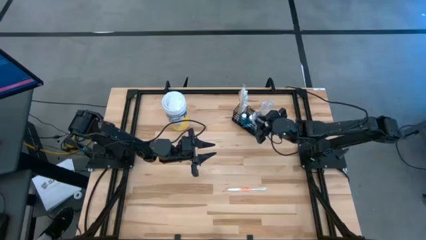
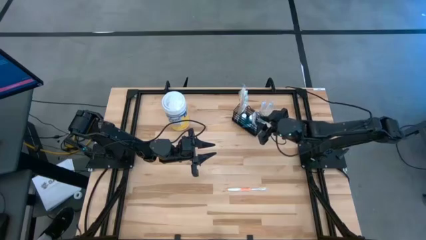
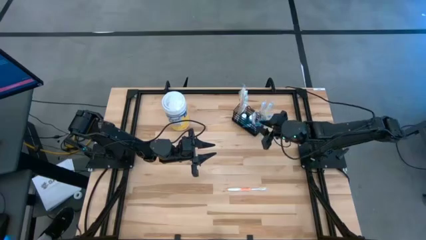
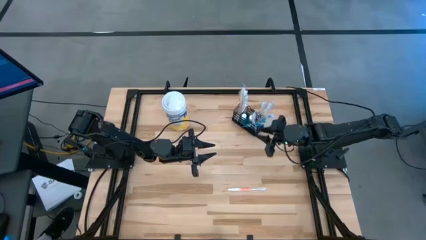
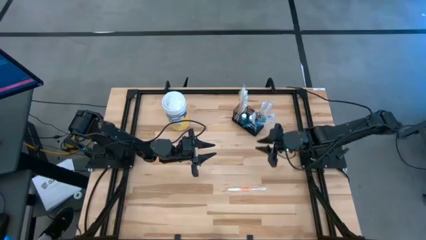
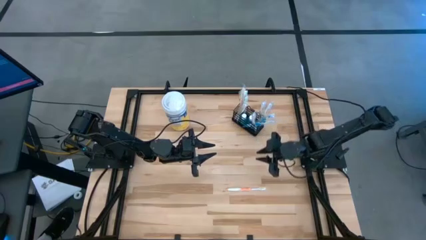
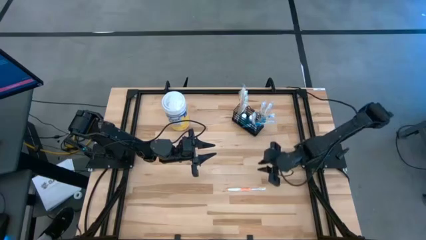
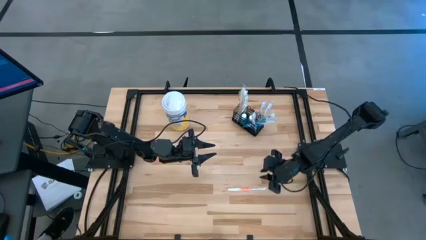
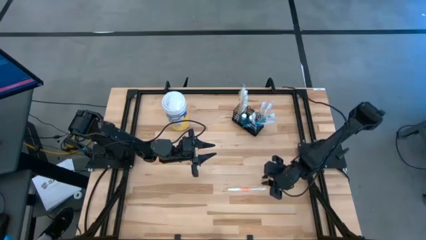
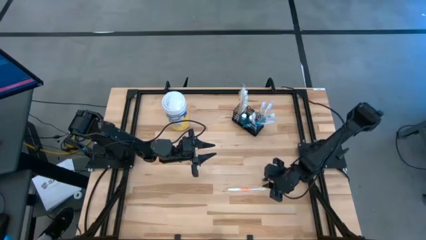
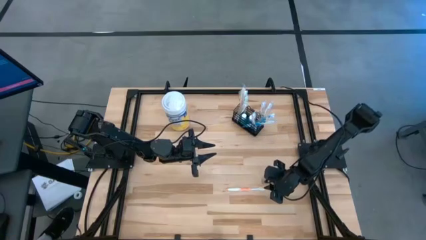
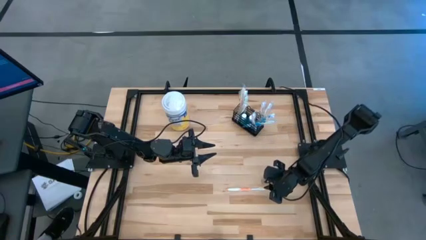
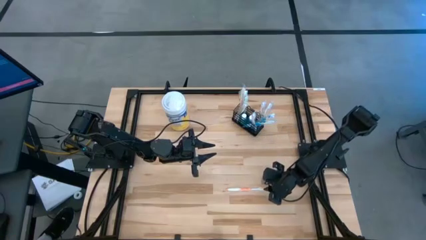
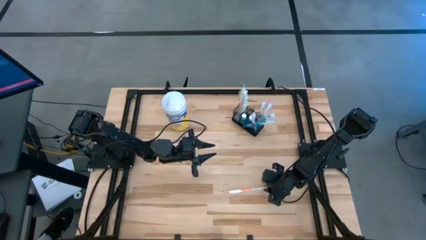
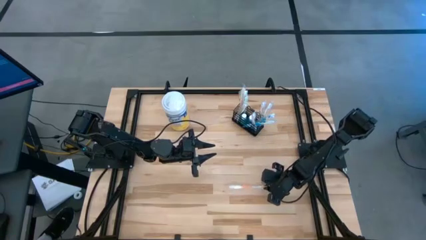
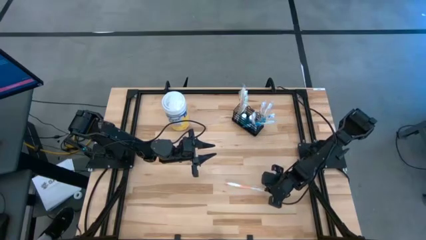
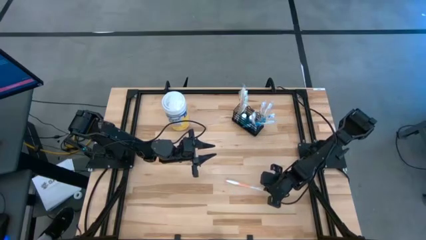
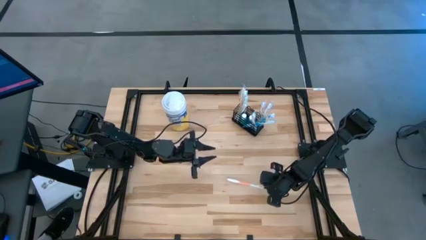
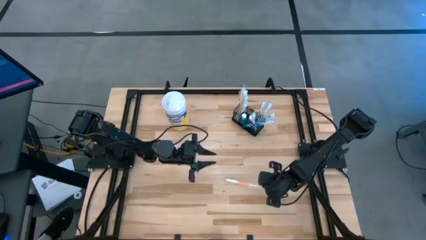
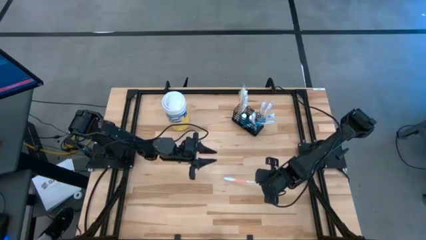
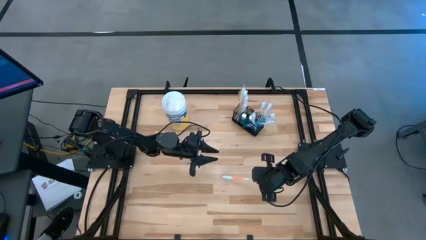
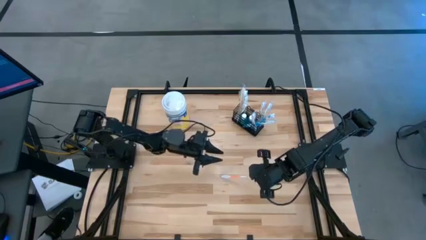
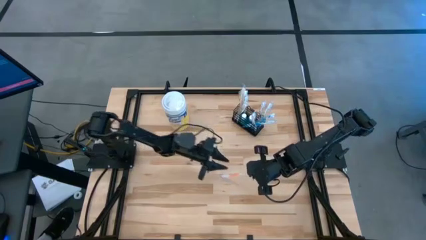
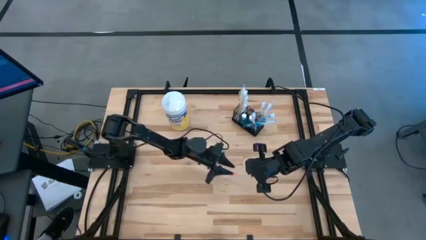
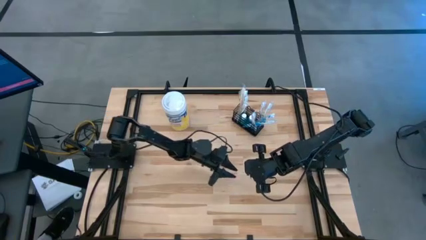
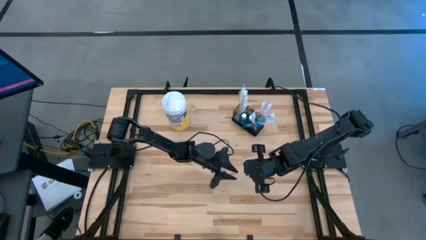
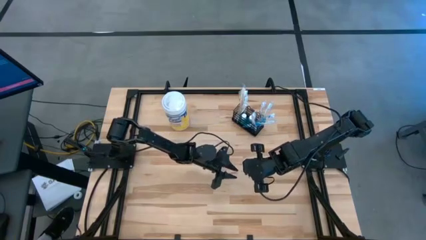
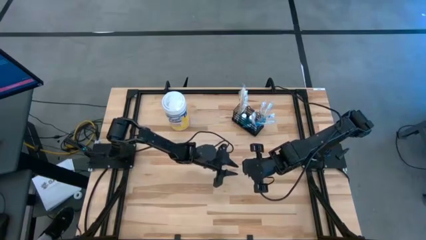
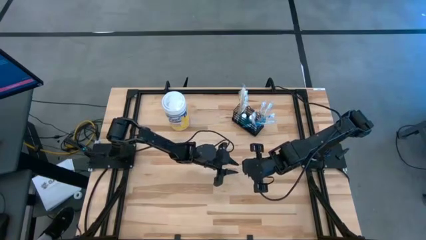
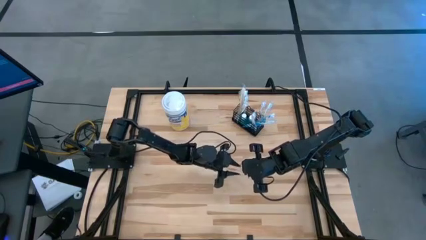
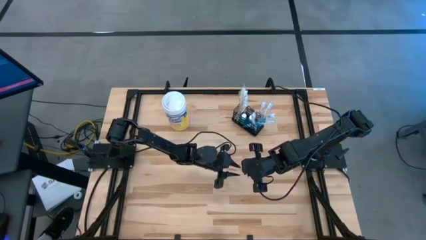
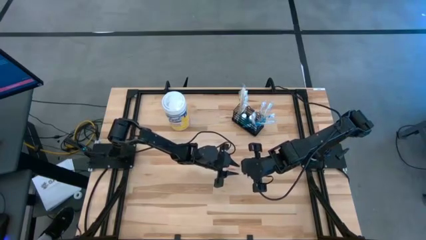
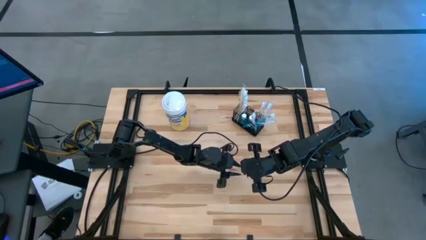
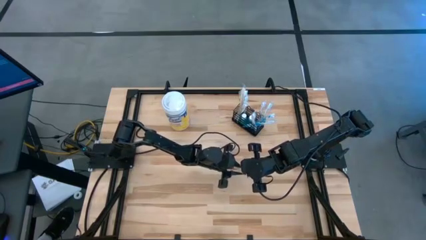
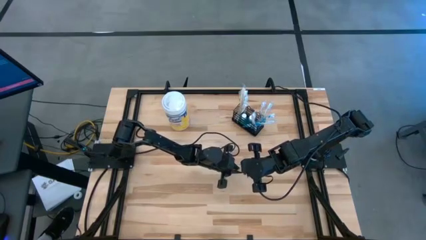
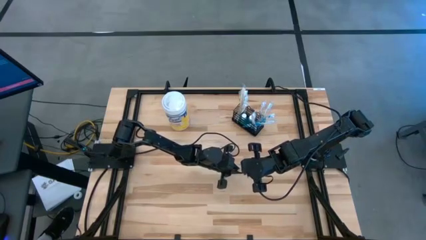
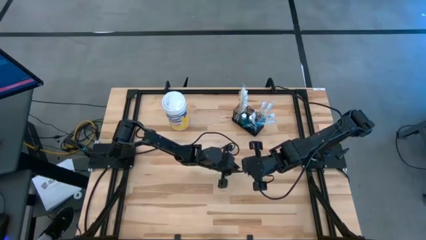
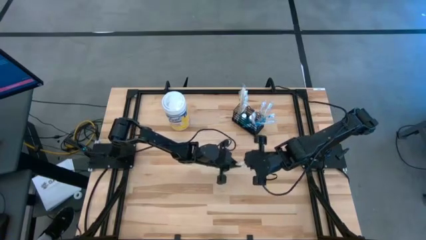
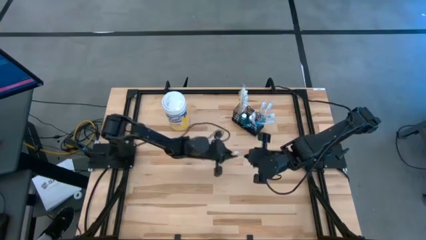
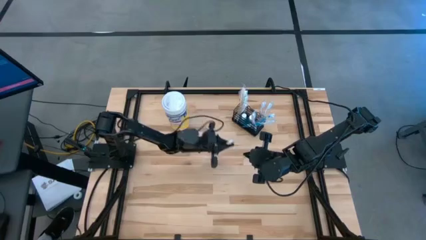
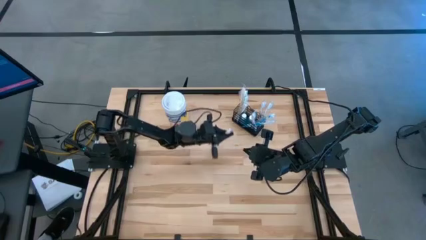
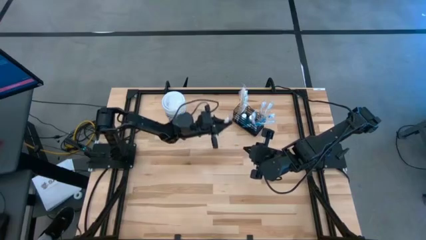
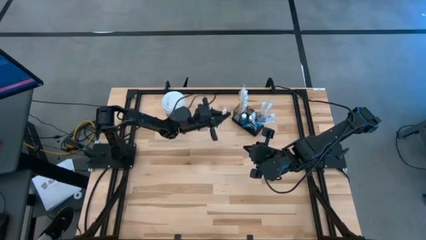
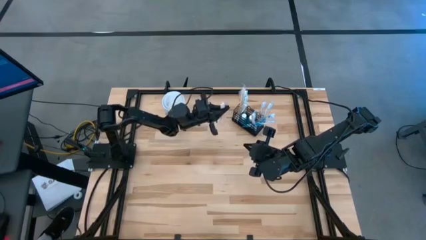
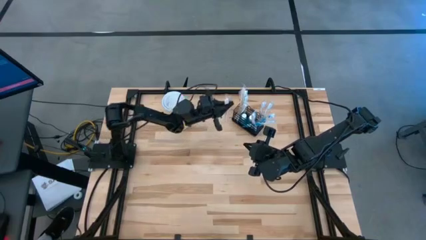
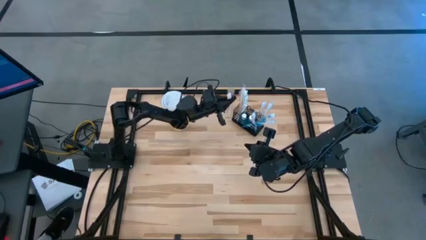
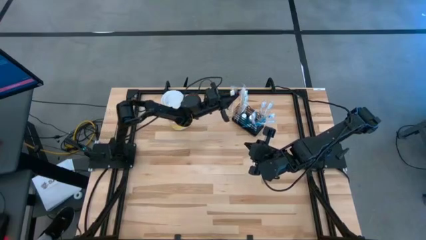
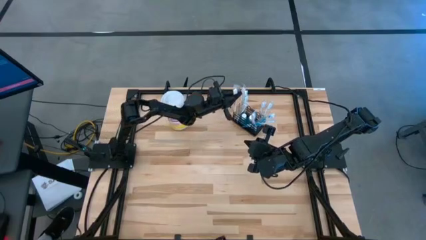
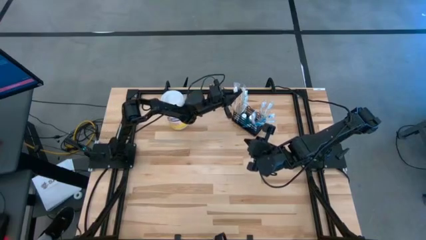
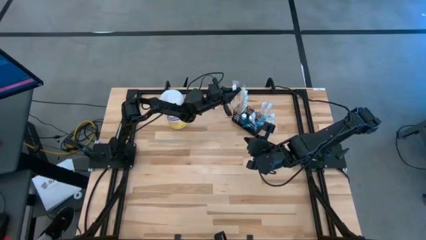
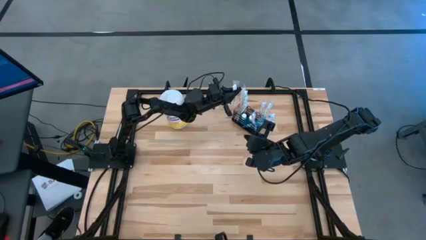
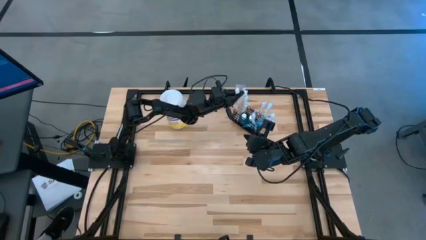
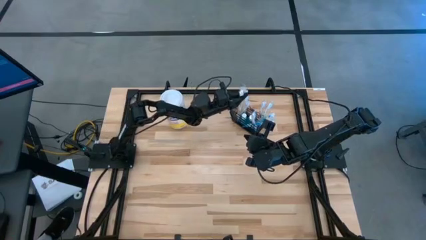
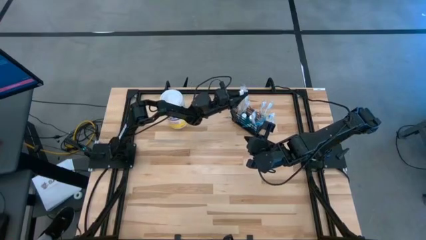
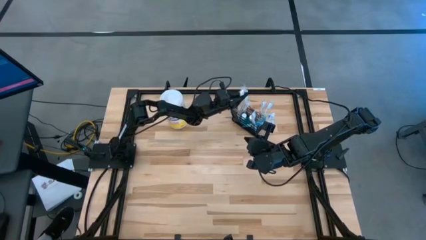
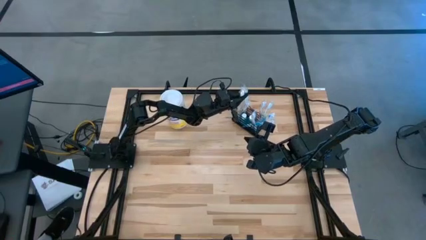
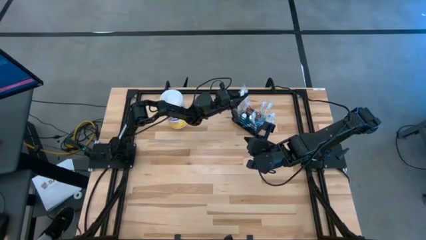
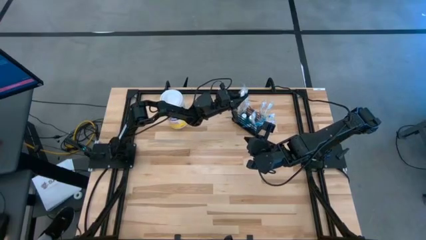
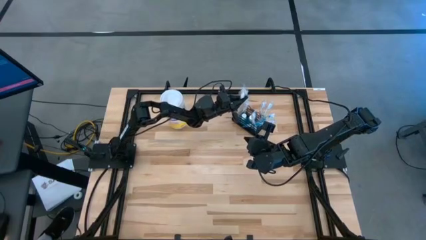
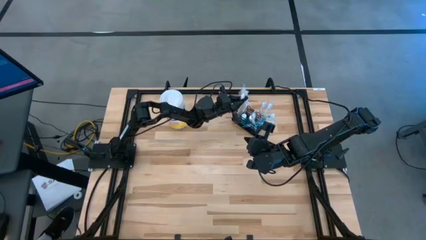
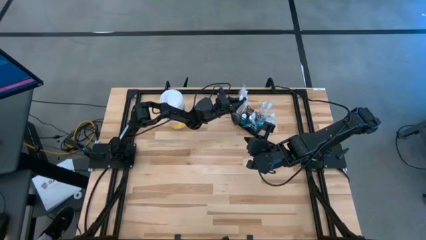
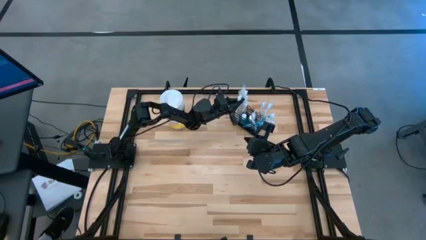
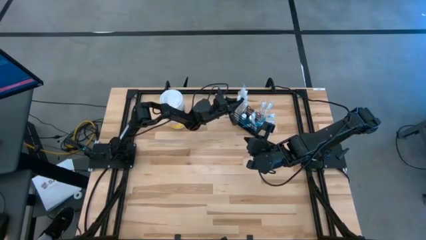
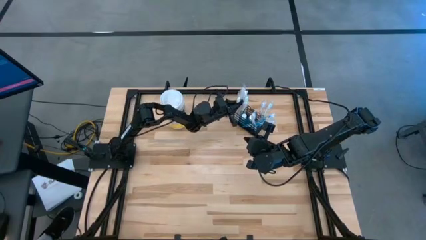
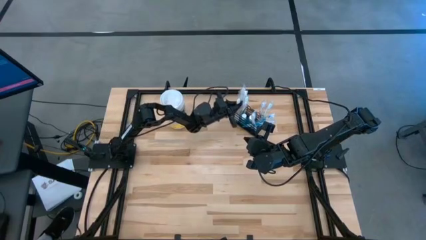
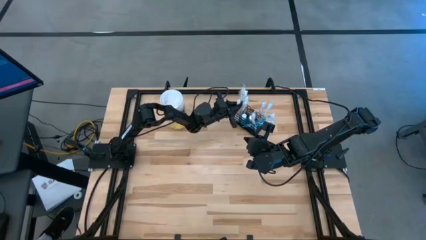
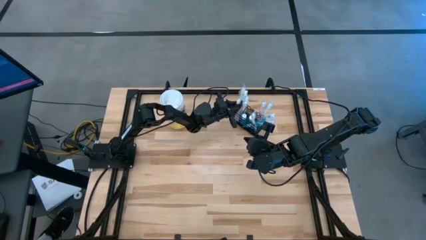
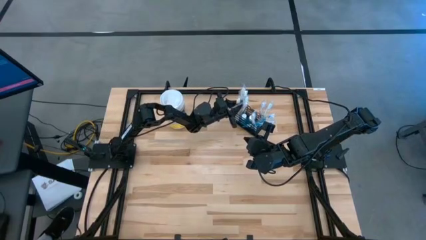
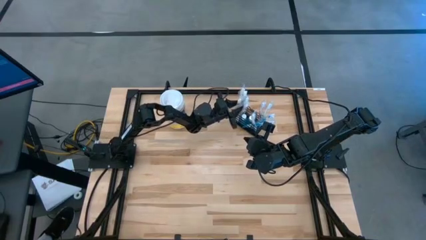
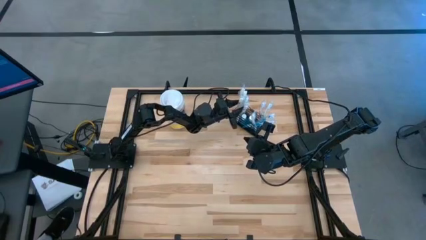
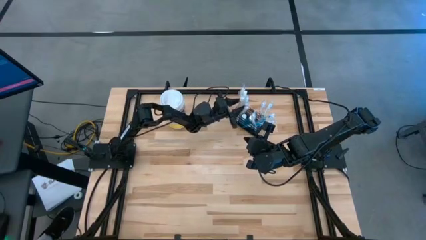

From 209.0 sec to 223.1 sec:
Task: Pick & Place toothbrushing station
Put the orange toothbrush into the black wire organizer

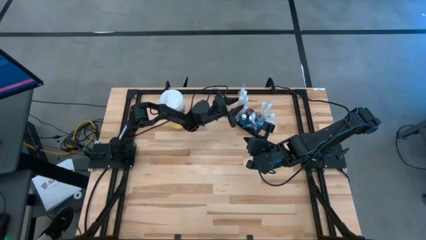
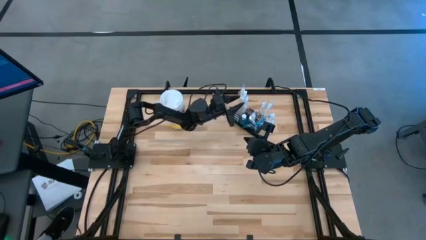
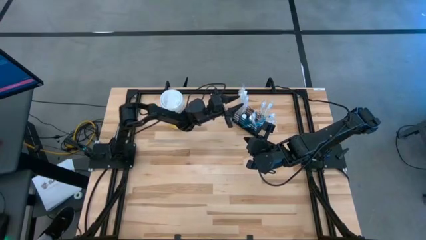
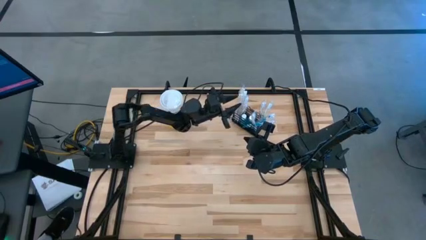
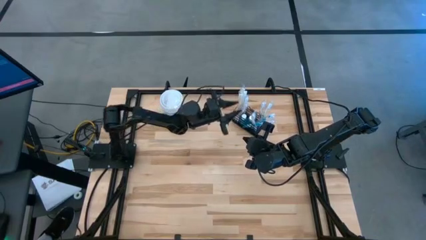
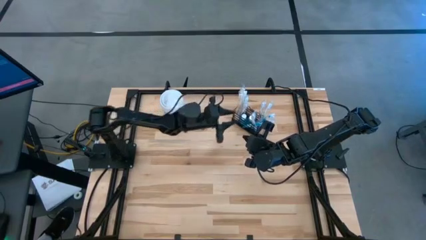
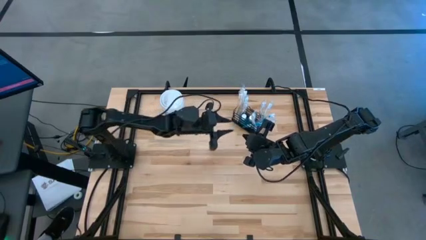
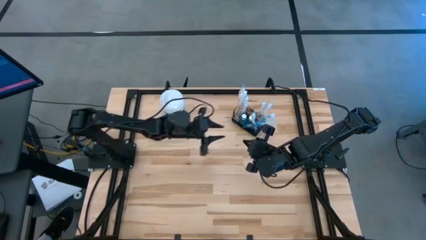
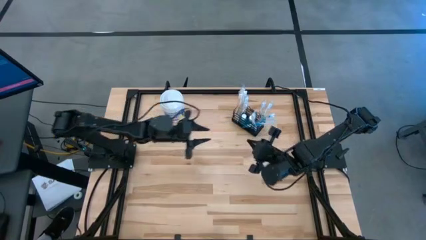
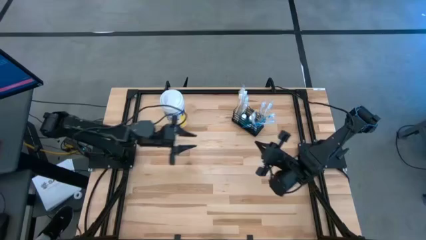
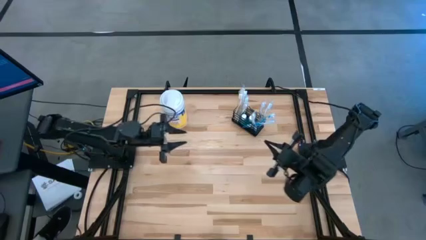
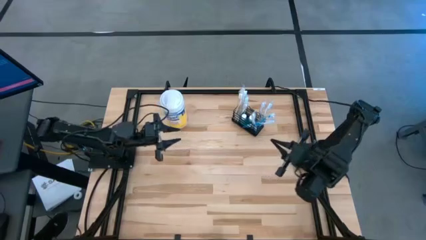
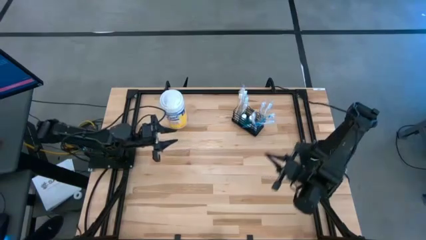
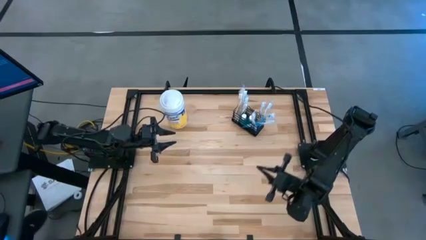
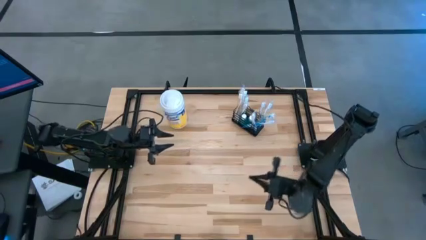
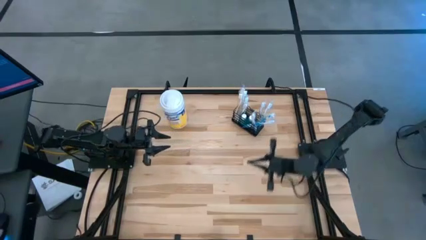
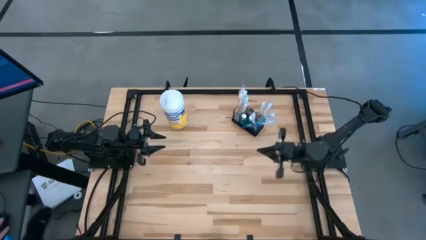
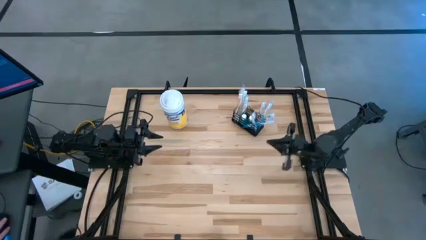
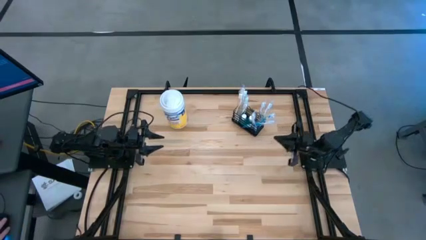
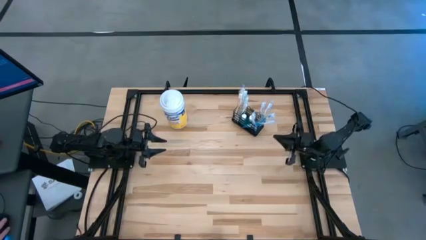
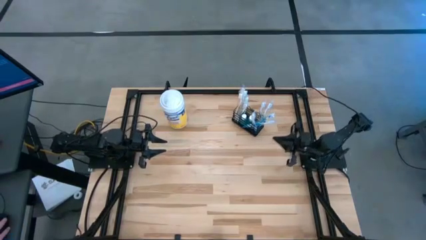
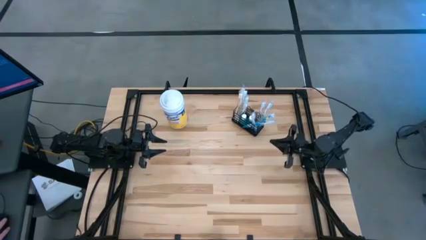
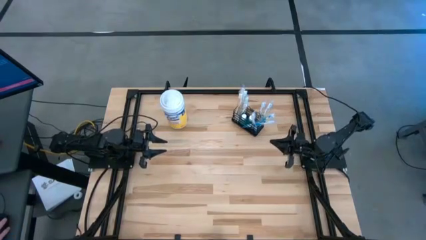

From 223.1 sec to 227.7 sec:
Return to Home Position
